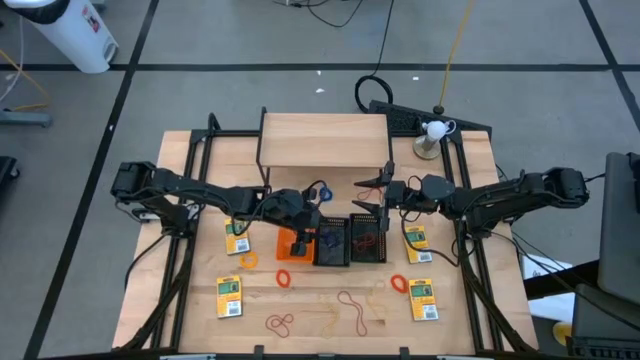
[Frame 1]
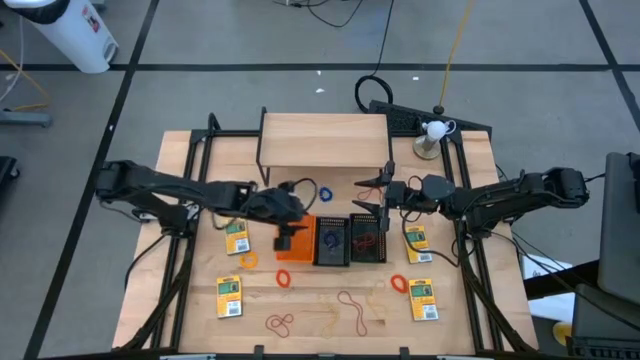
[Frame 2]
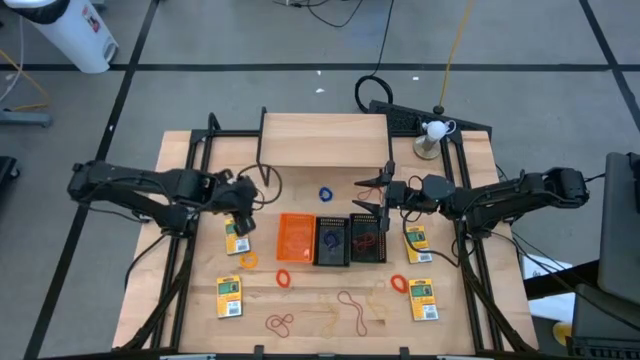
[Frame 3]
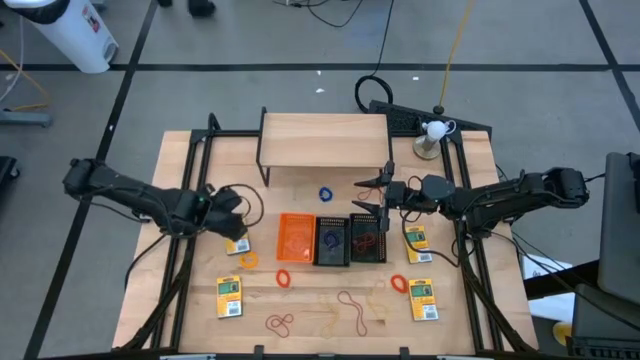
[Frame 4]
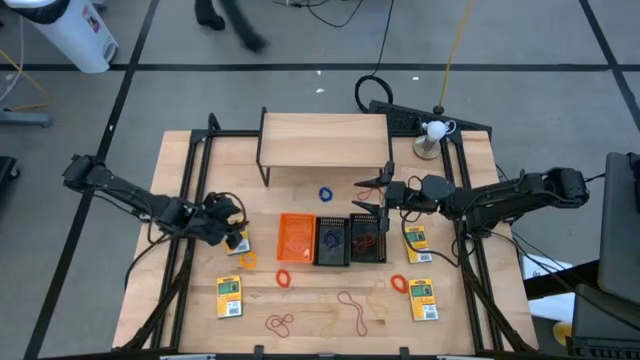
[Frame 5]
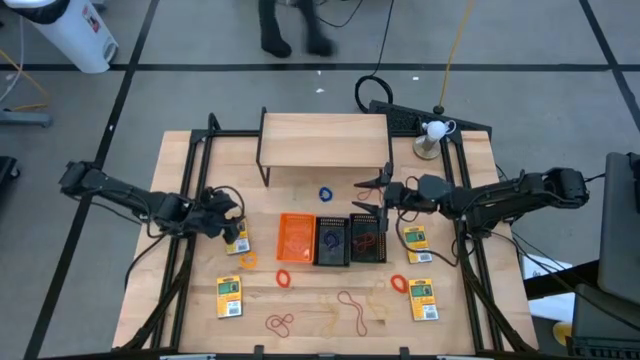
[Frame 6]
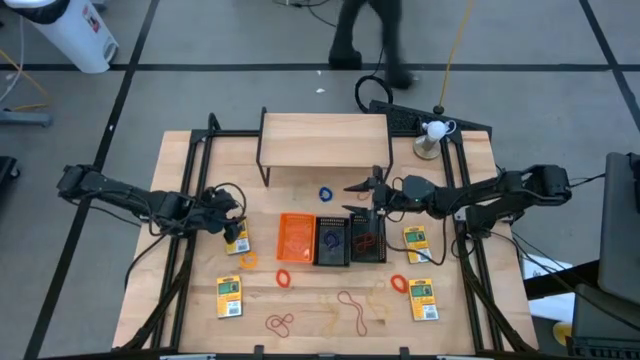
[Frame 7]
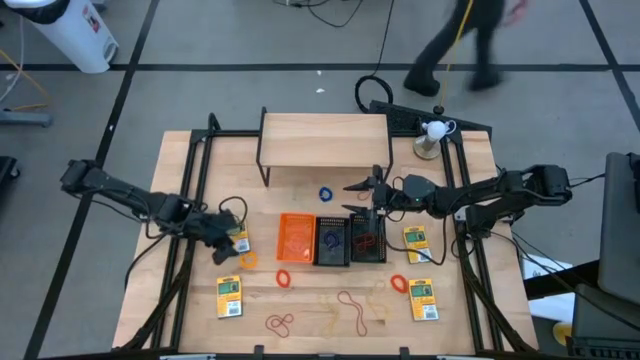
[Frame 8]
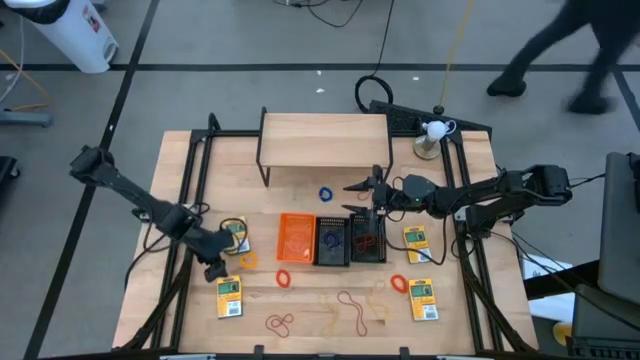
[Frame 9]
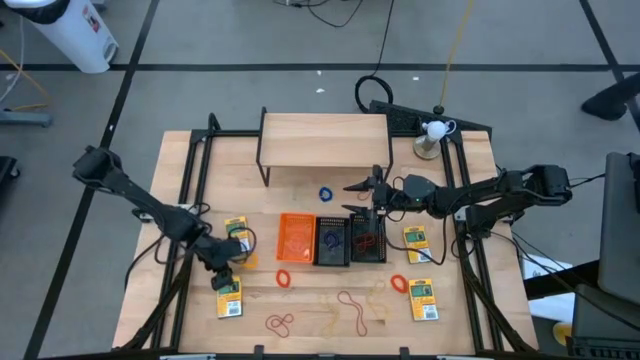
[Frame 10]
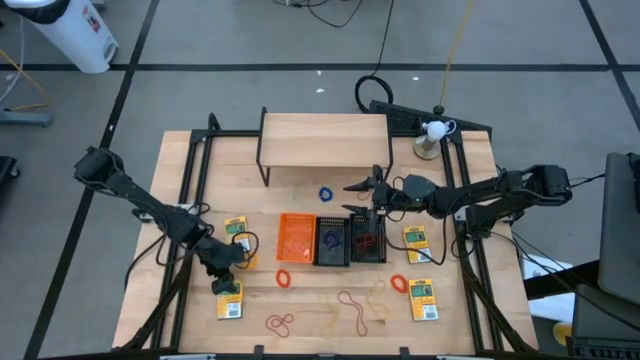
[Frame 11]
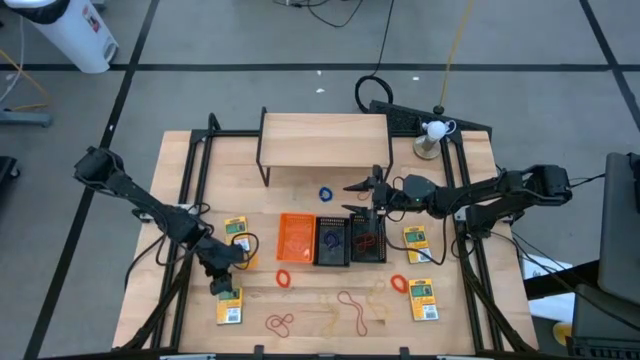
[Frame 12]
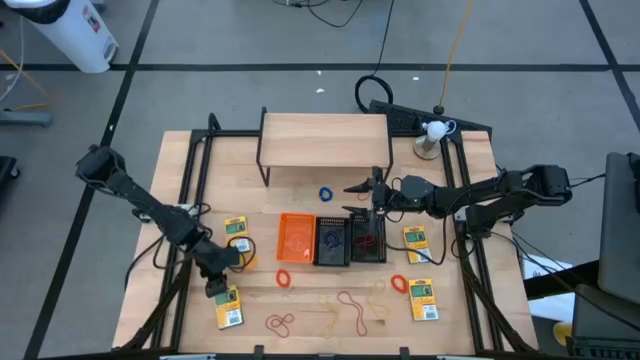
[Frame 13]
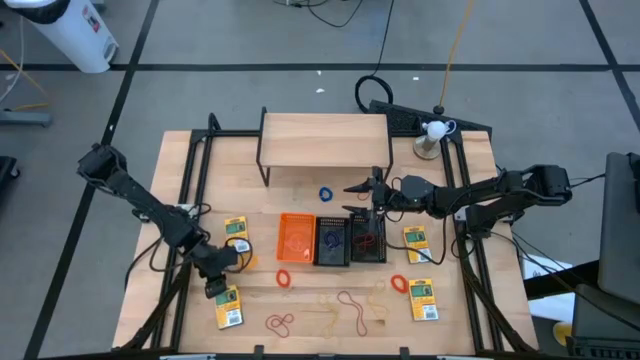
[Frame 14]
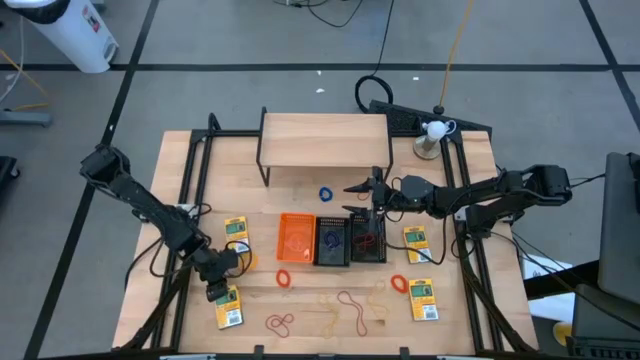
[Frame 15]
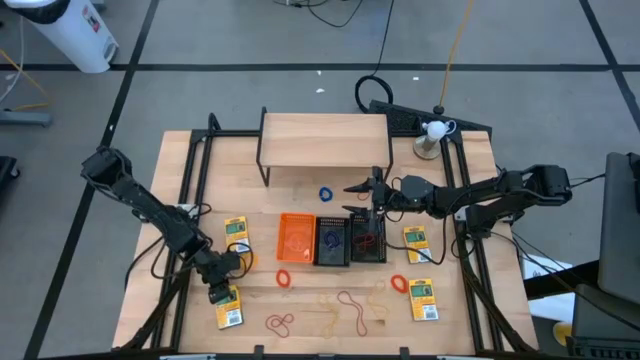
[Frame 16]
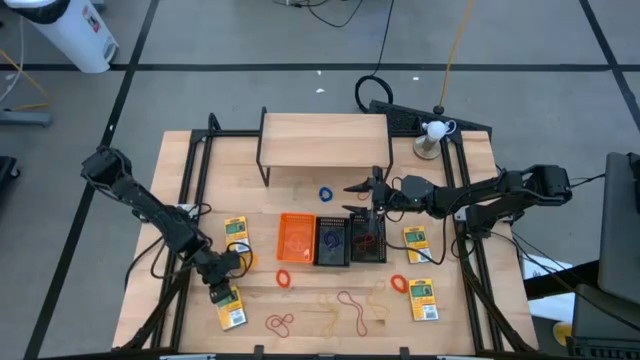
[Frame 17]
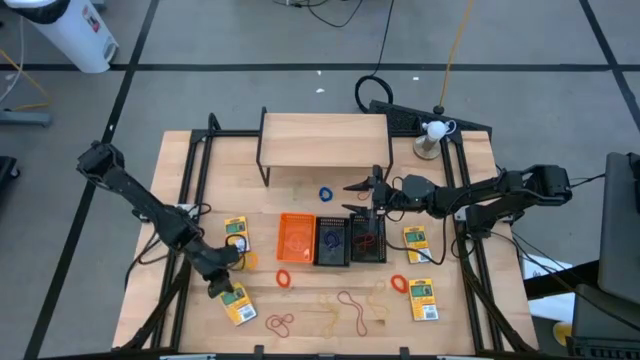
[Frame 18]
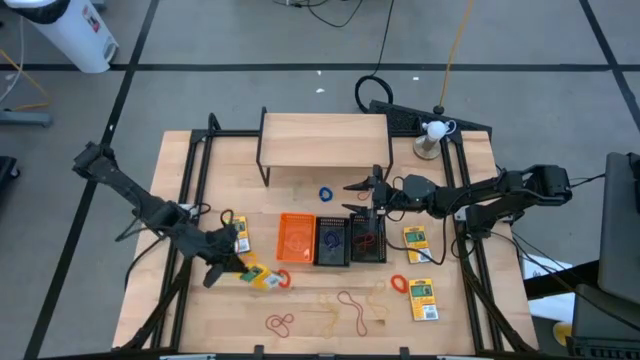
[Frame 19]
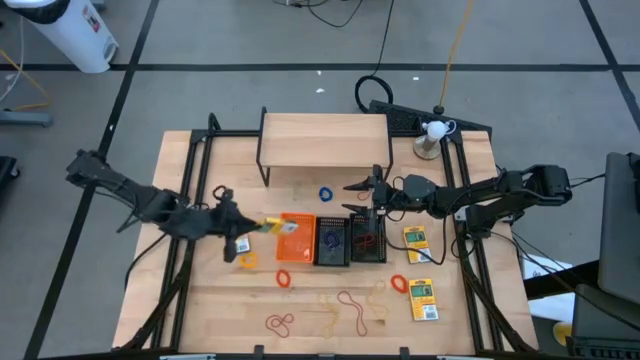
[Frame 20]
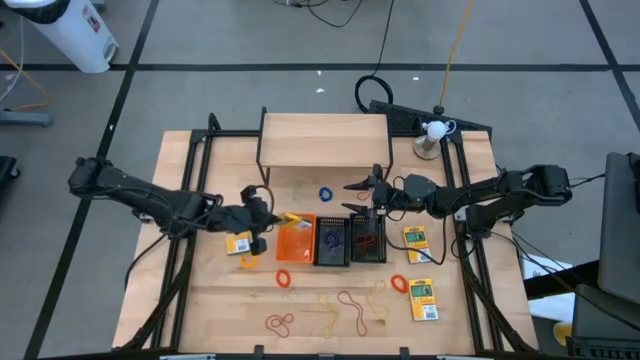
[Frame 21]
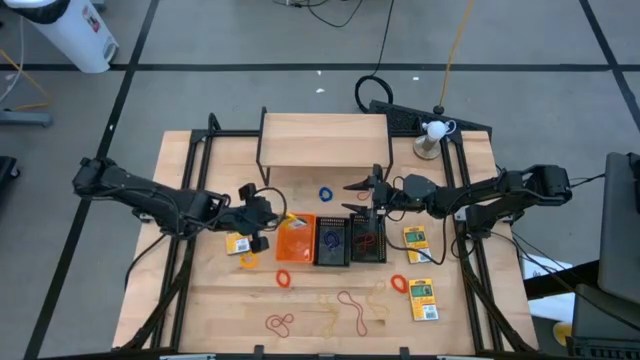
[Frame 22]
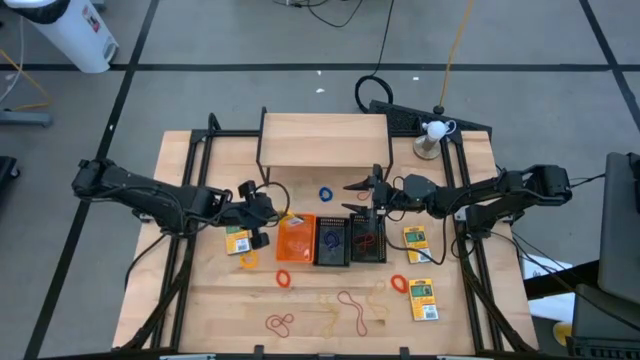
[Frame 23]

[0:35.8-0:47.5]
Task: Pick & Place Office Desk Supplies
Put the crayons box into the orange bin

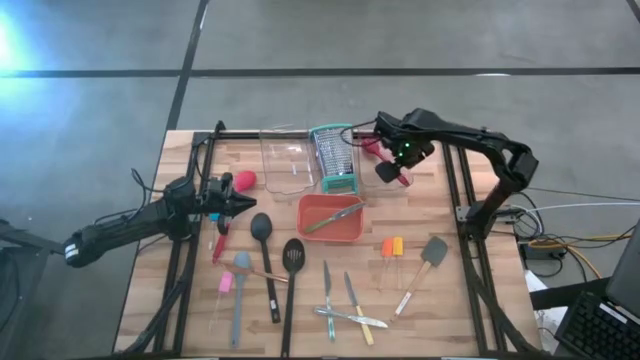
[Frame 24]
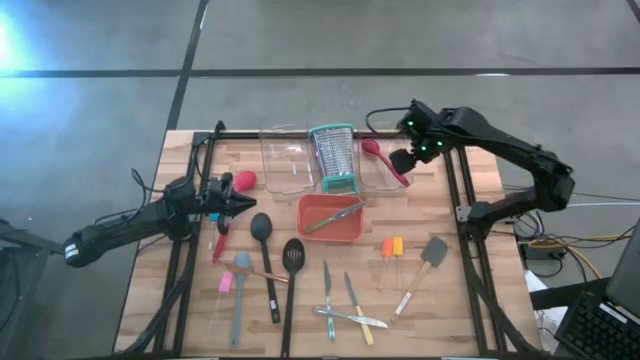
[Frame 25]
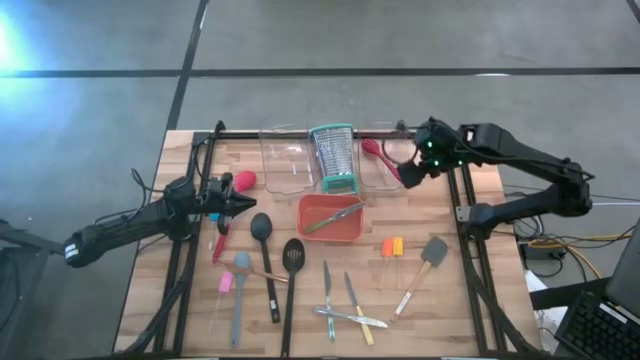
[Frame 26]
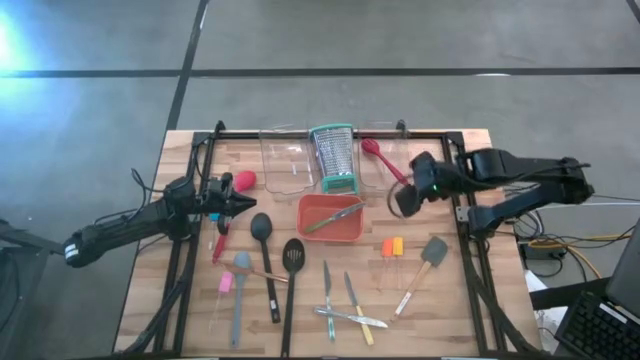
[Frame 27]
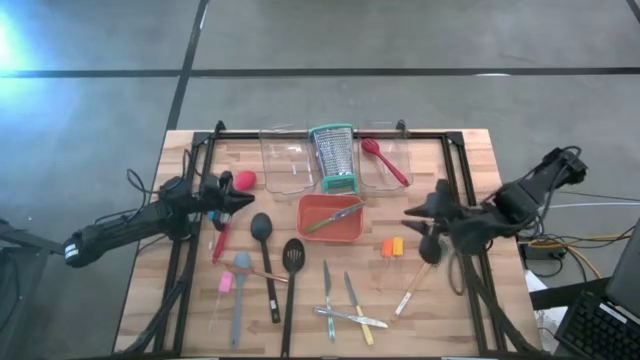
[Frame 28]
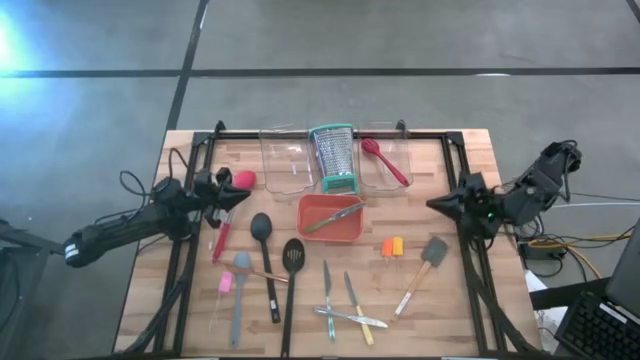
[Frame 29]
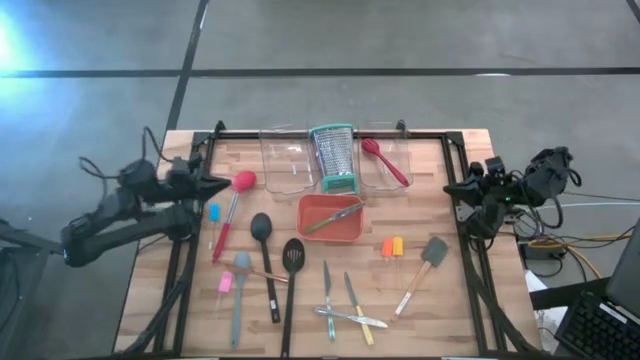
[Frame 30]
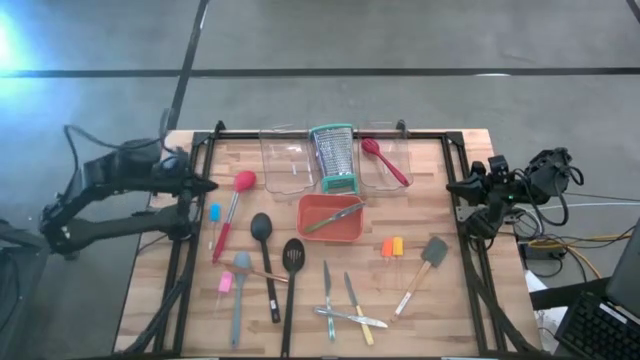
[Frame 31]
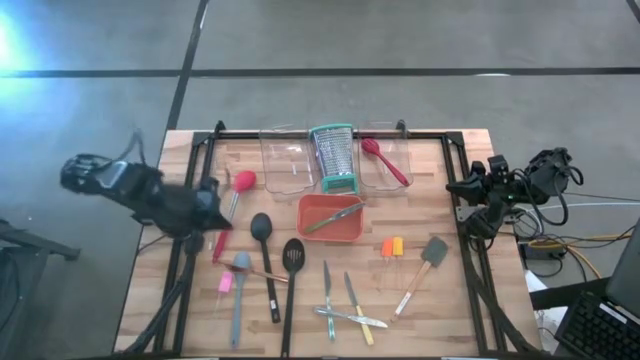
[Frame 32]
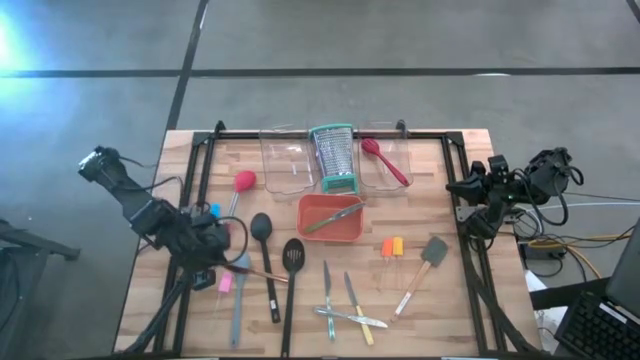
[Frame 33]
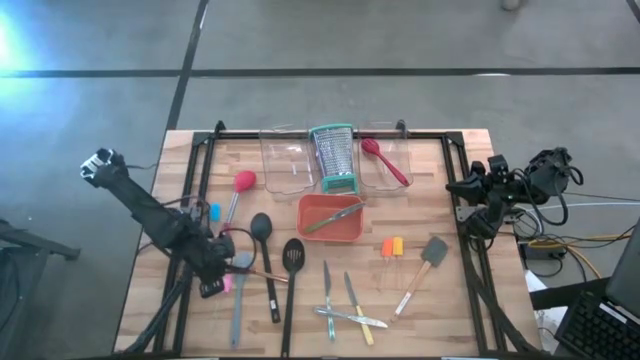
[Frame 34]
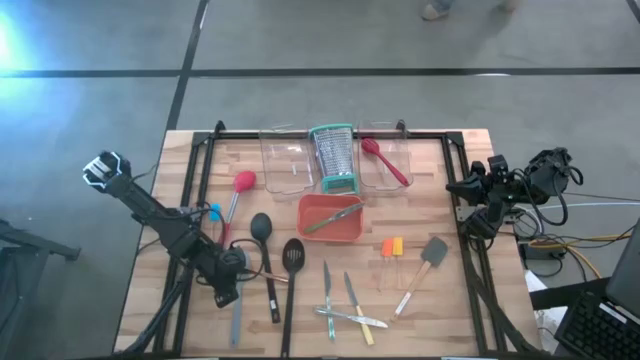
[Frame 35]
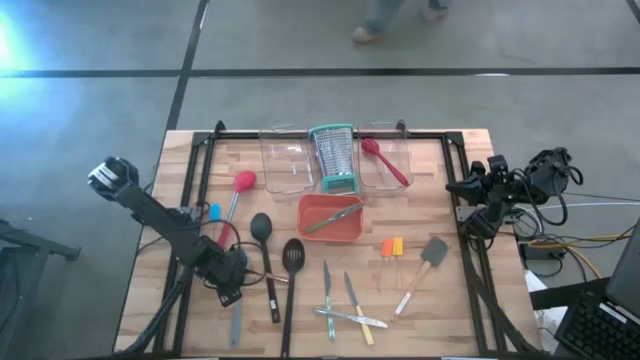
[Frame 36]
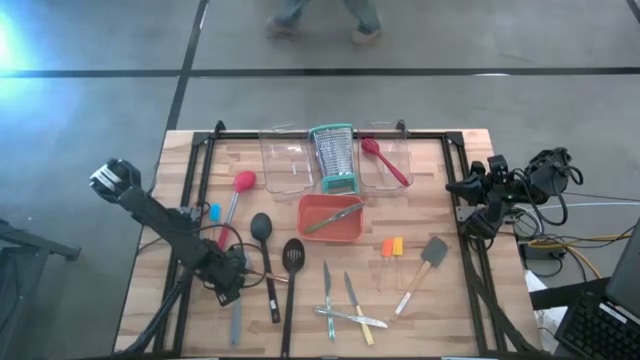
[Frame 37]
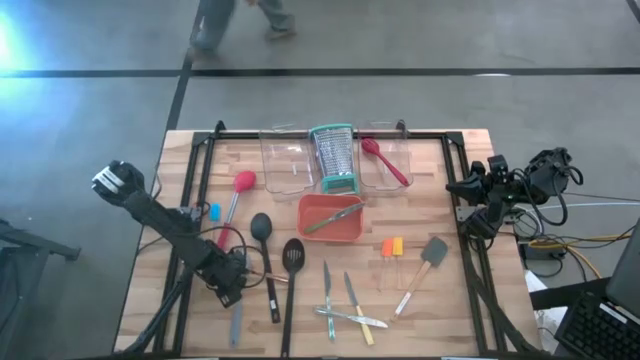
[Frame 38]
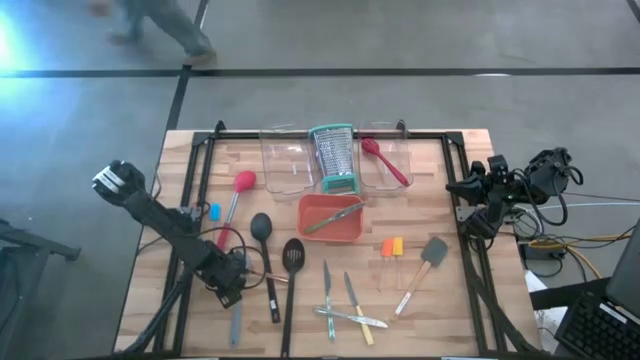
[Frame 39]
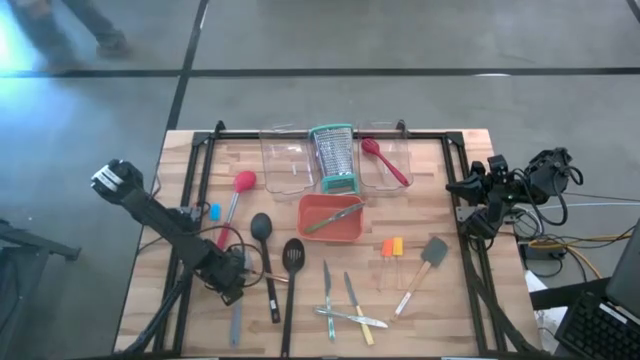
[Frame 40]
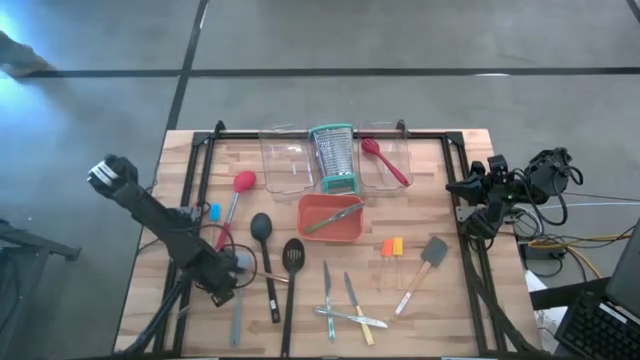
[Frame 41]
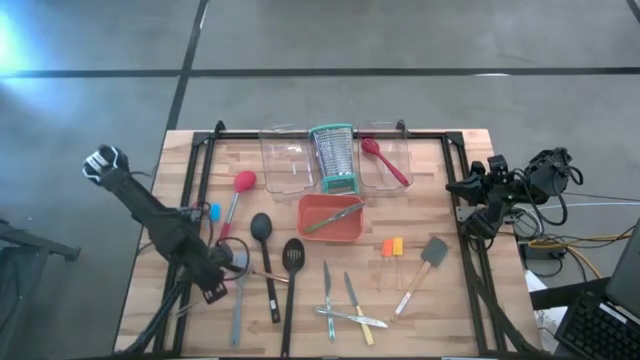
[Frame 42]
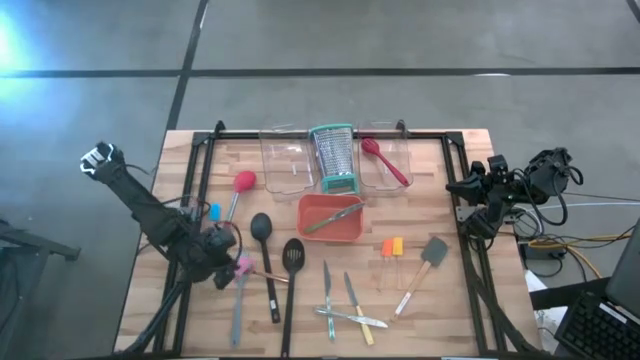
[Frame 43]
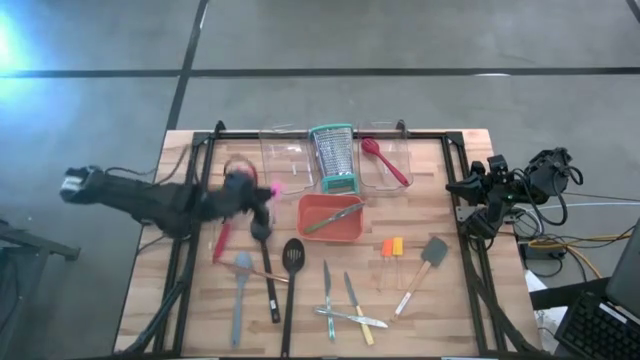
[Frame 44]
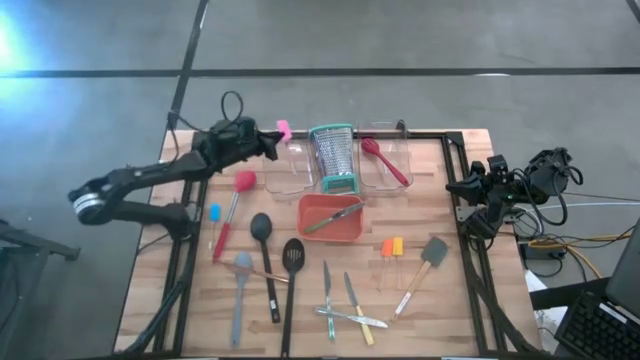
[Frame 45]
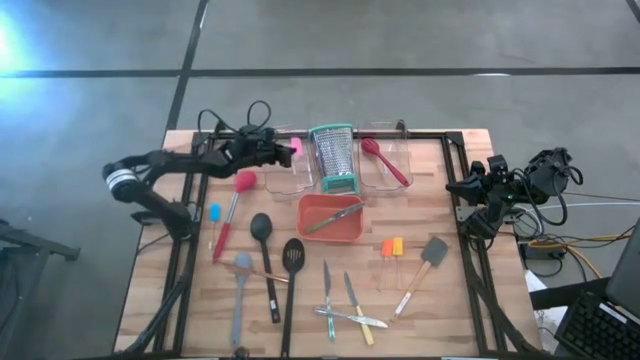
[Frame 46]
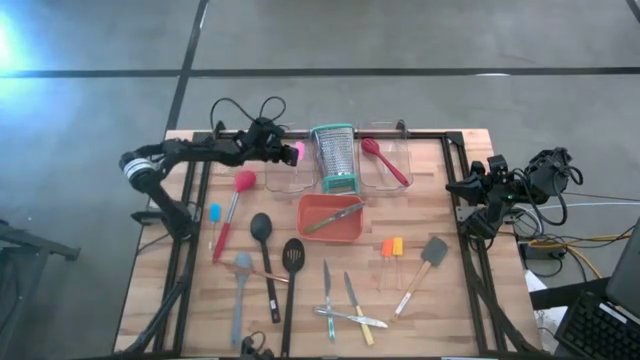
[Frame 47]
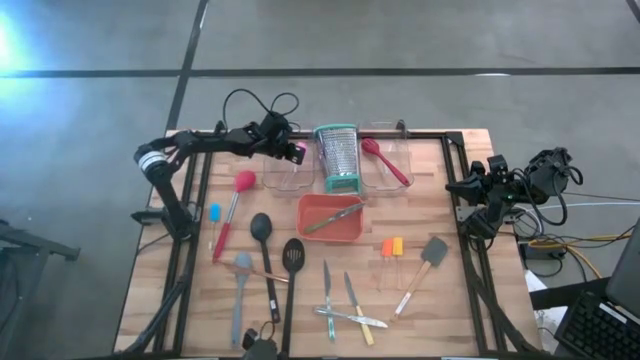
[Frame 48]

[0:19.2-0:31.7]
Task: Pick & Place Kitchen Items
Put the pink spatula into the left transparent bin
